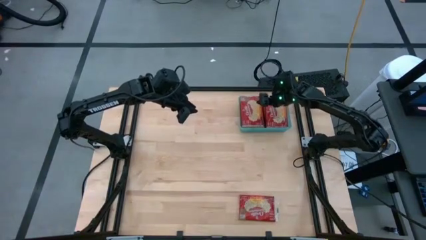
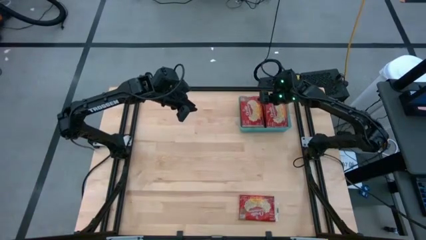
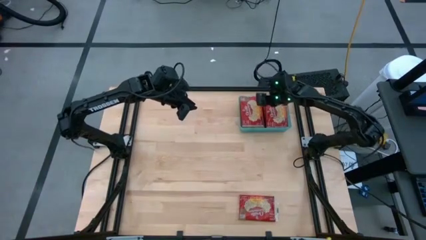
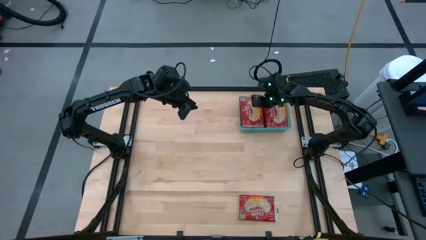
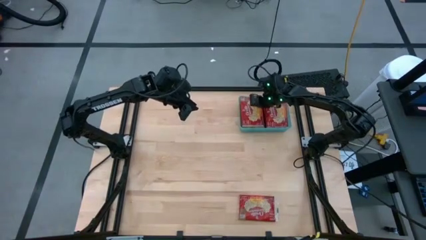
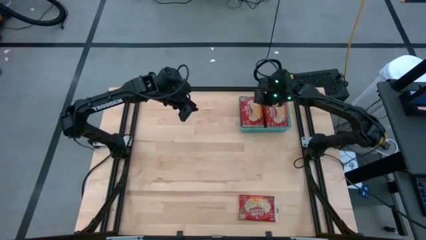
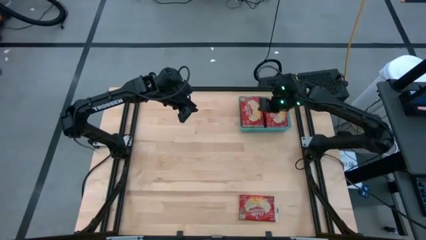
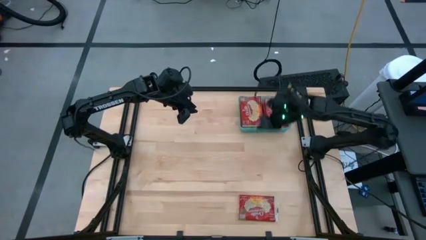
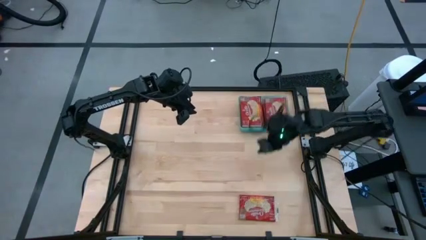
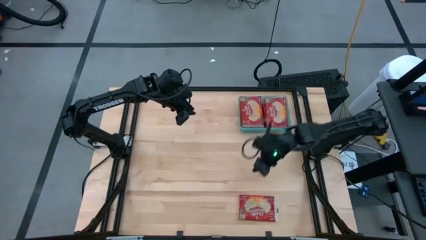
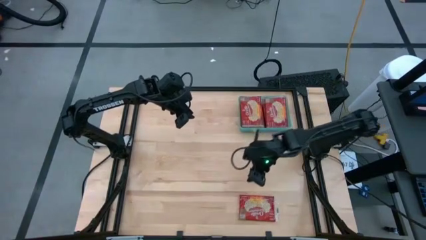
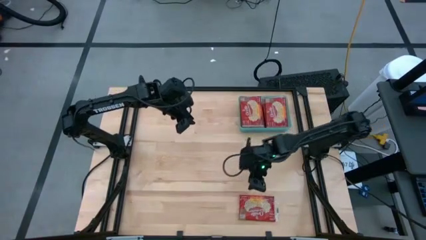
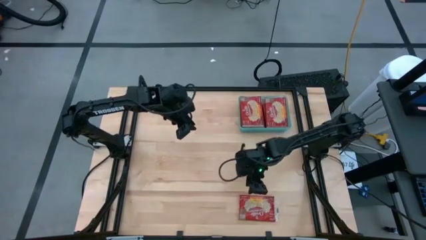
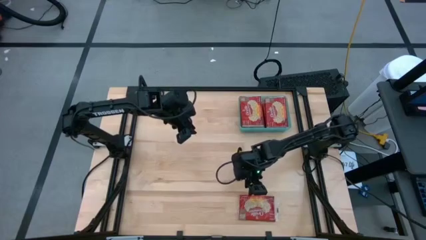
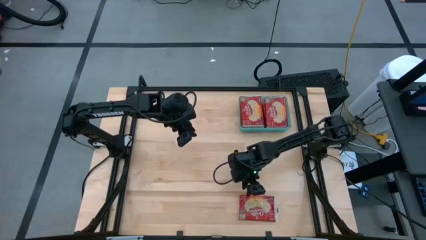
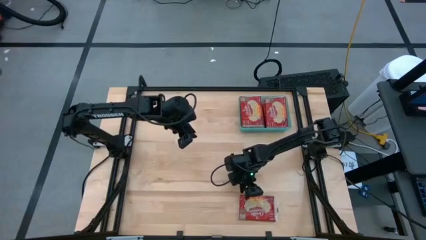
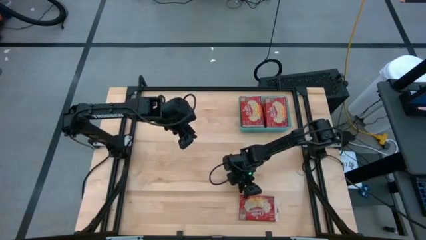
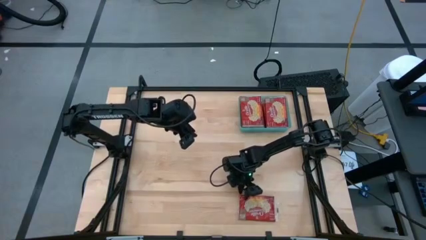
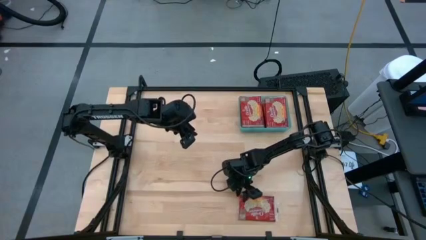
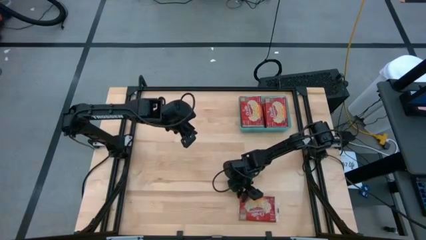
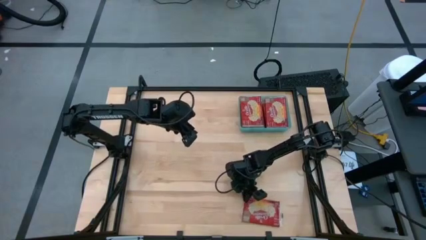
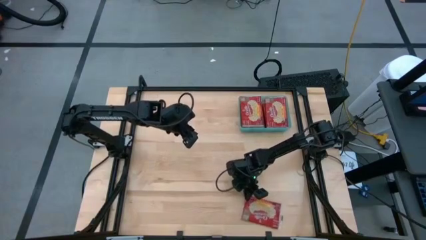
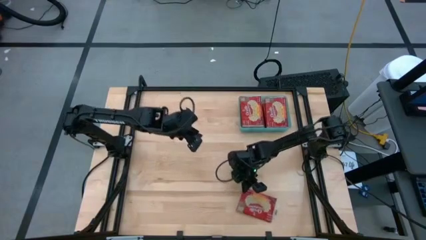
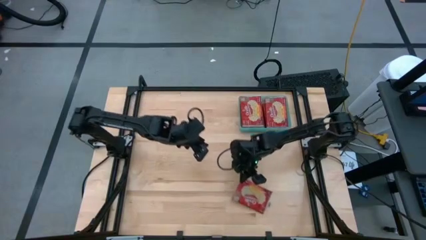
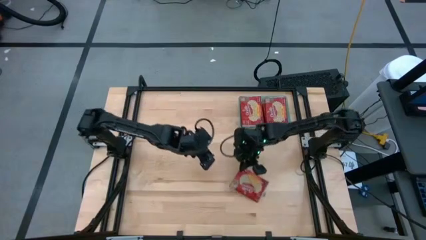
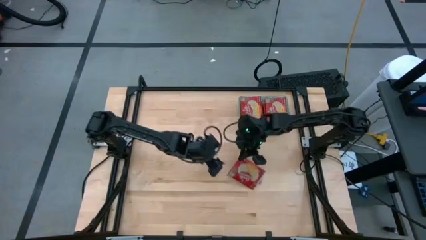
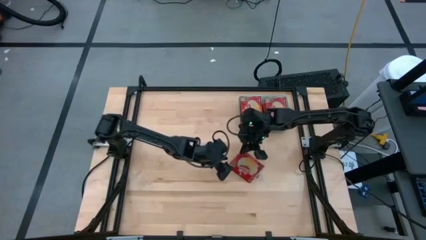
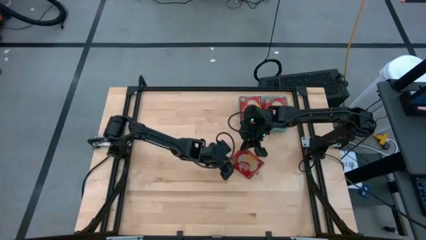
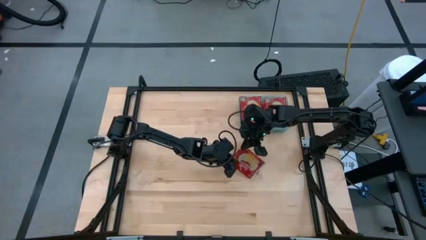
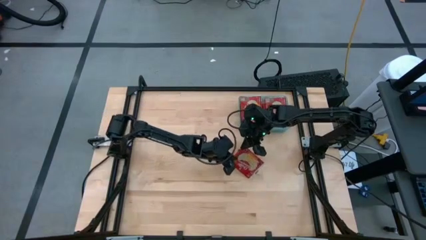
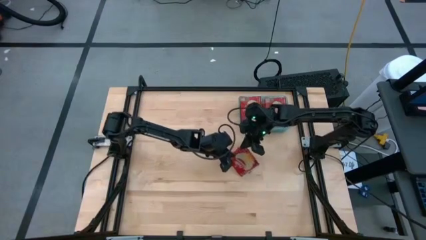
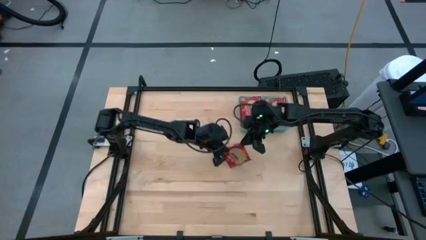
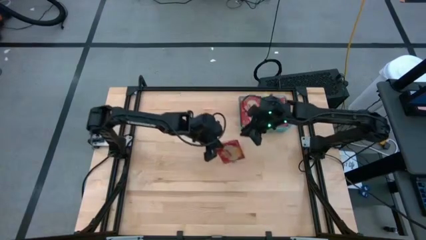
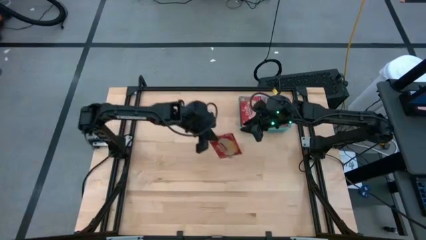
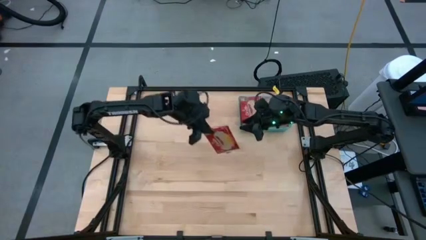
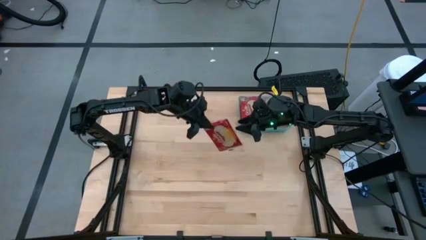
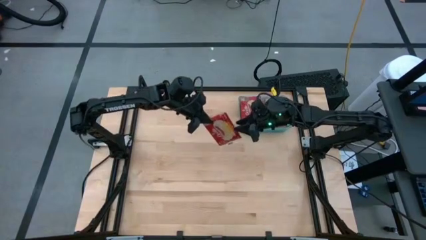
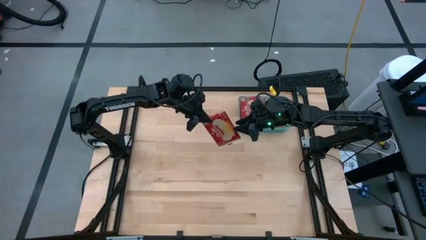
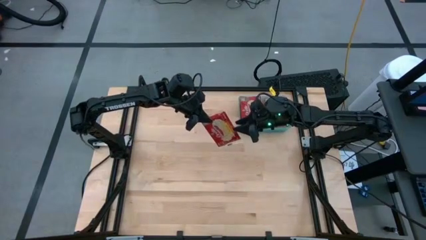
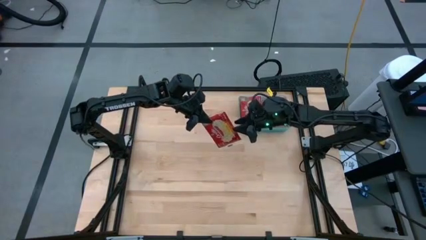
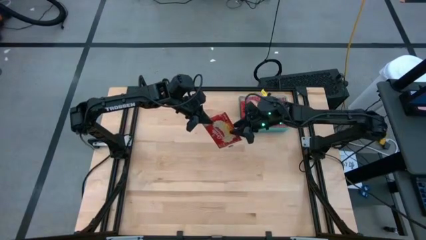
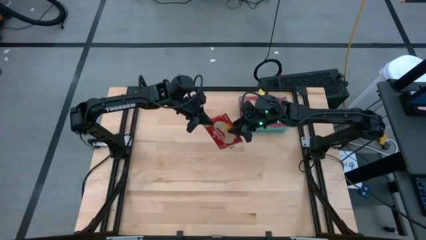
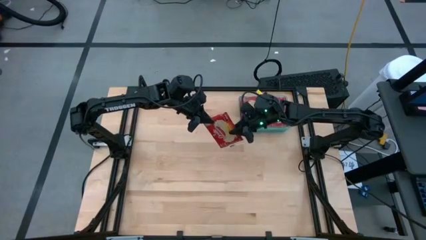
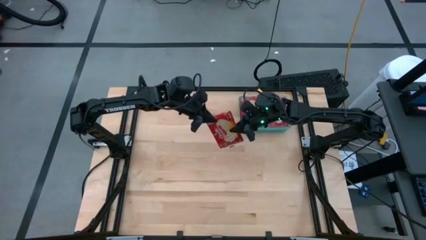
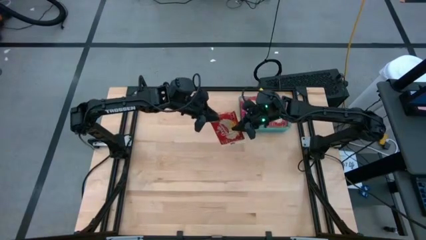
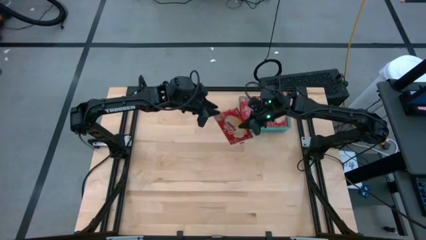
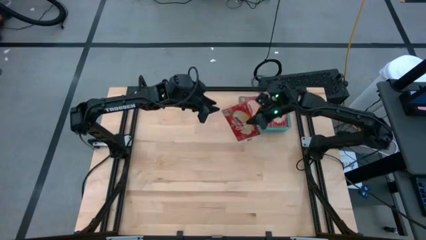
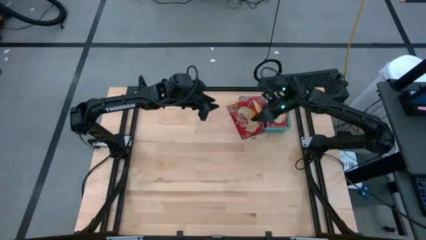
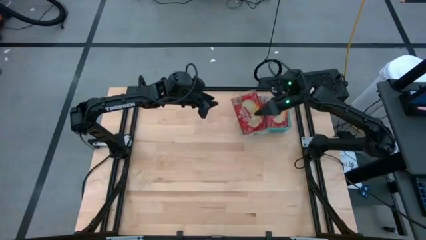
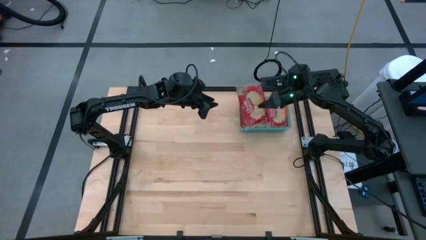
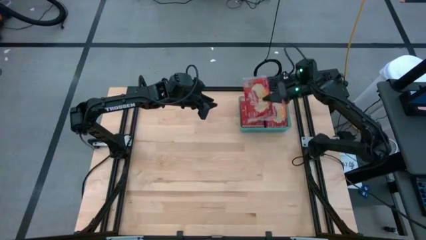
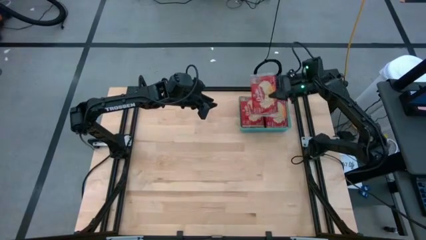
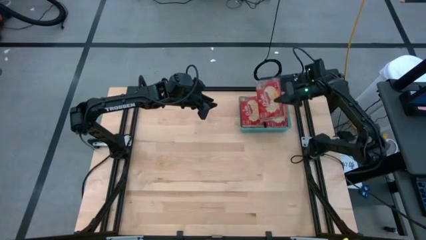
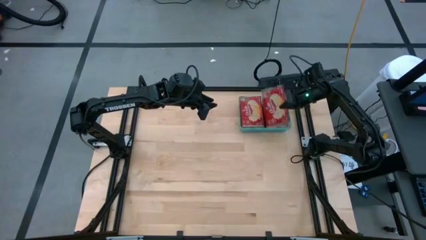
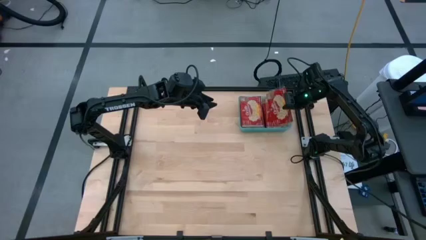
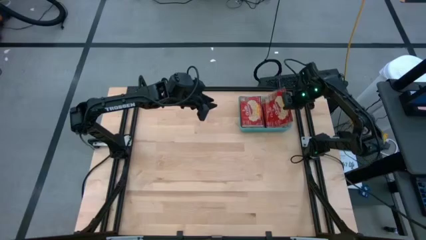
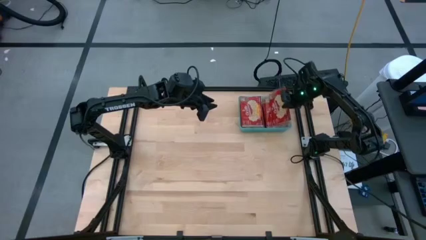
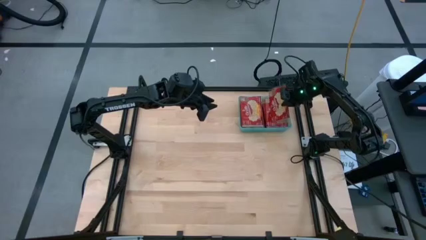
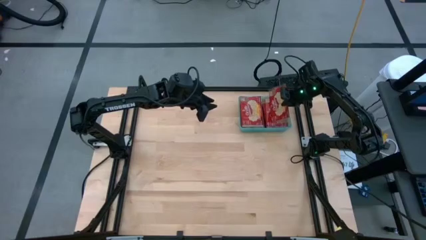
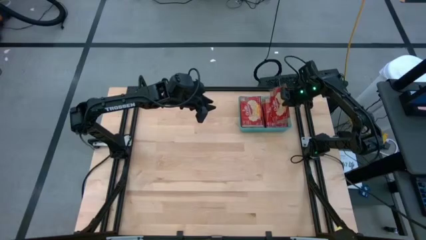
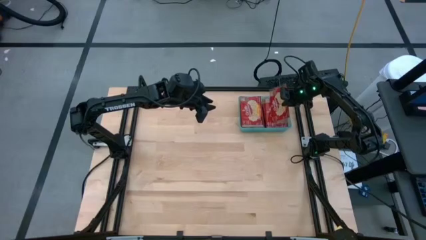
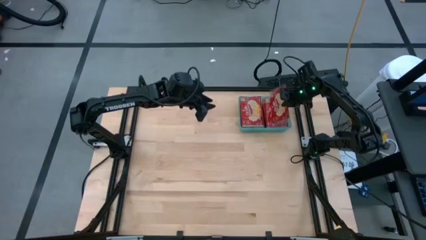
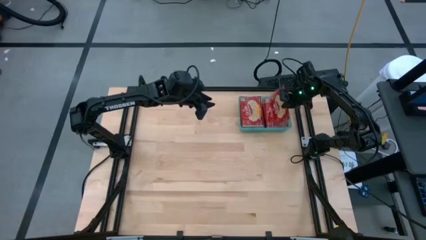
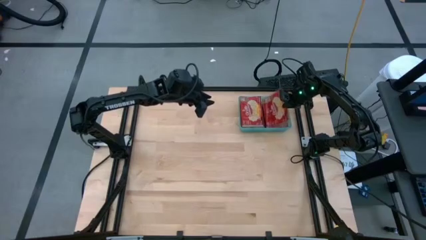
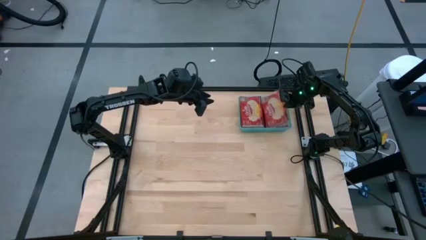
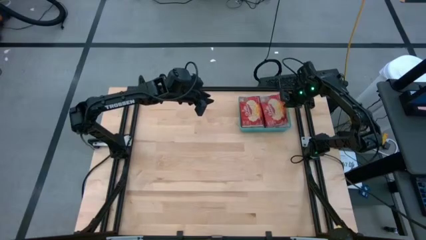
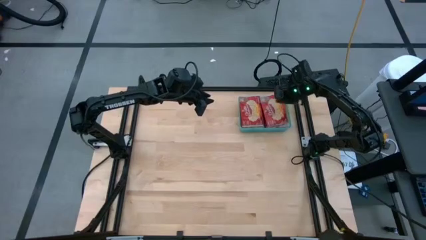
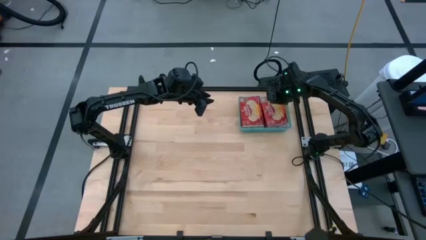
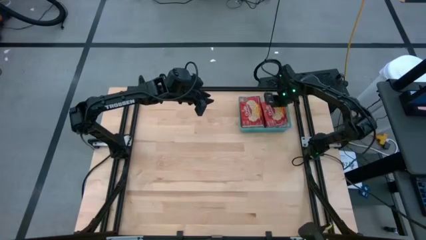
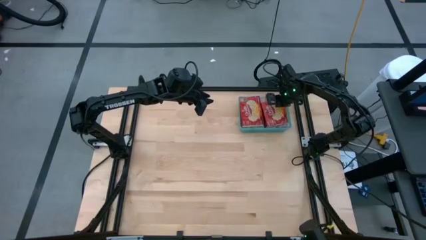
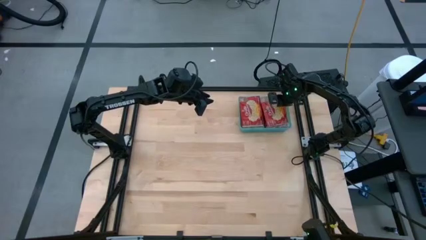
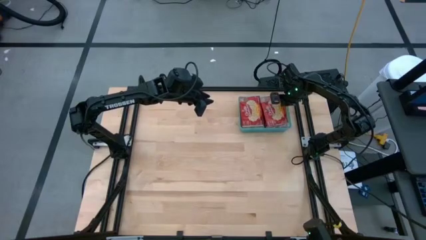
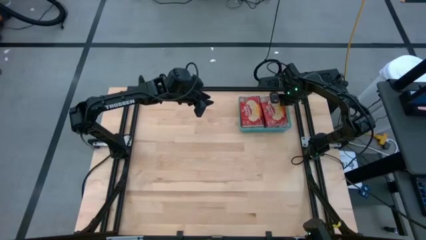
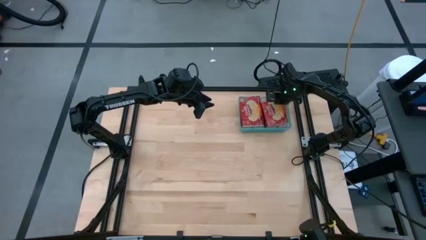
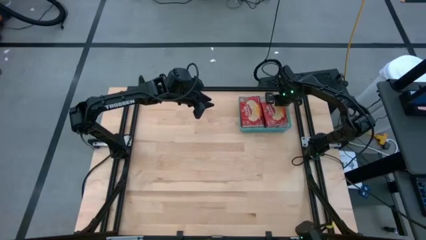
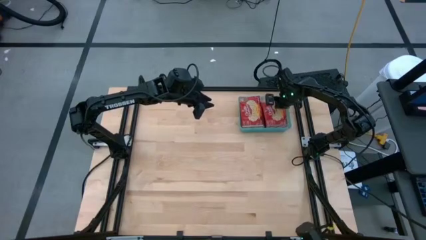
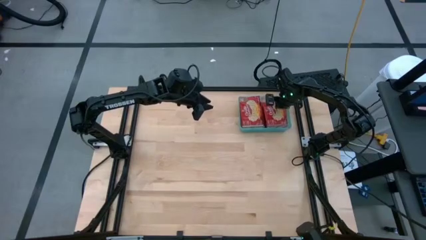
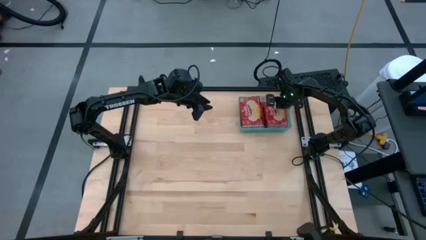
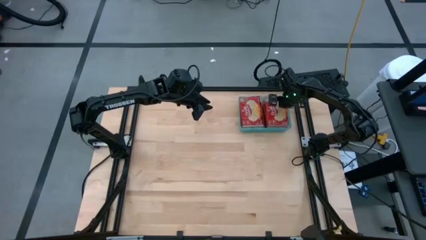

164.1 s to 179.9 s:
Task: Sort popcorn bags into baskets
Put the red popcorn bag into the light blue bin
